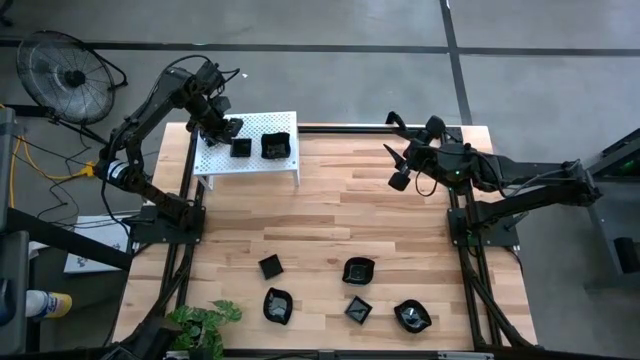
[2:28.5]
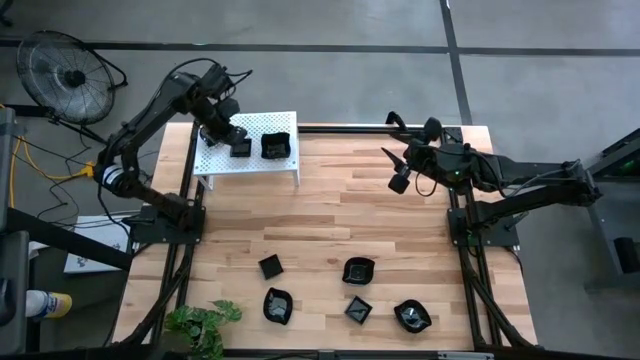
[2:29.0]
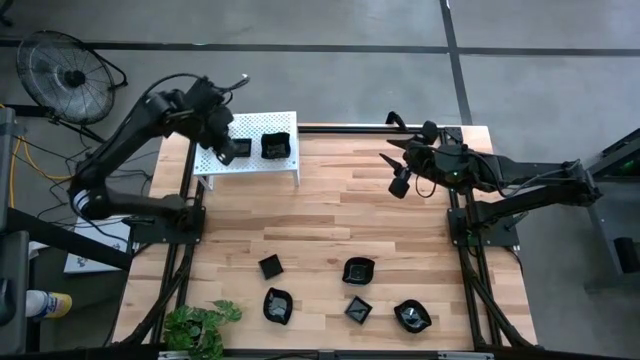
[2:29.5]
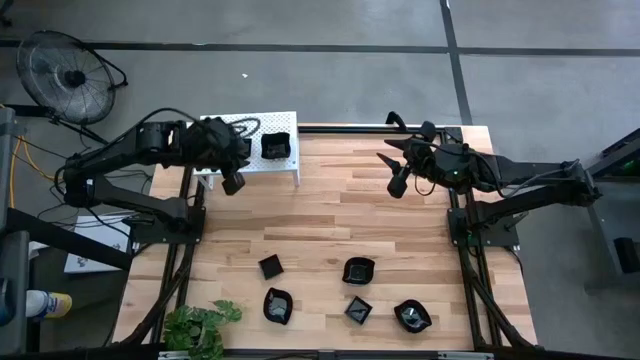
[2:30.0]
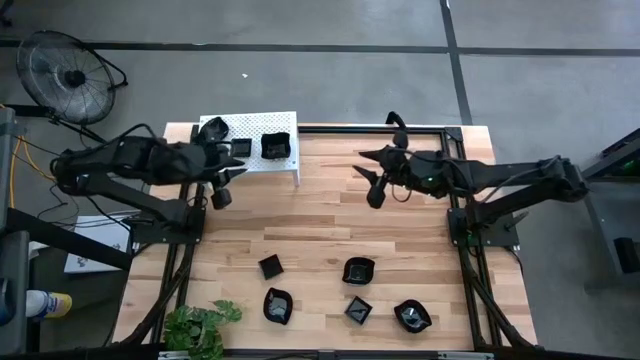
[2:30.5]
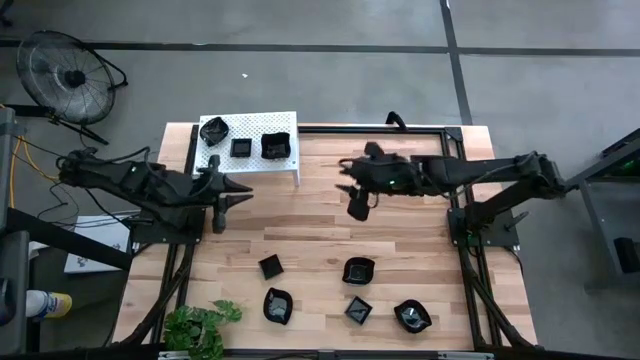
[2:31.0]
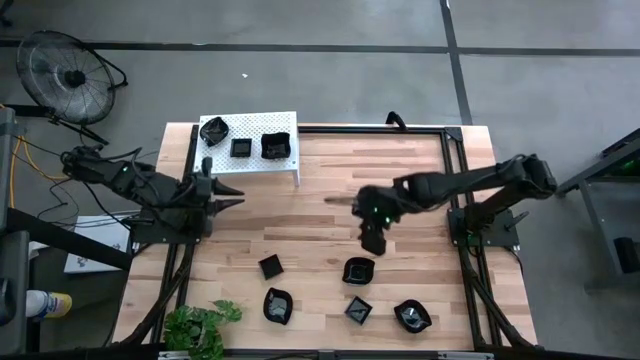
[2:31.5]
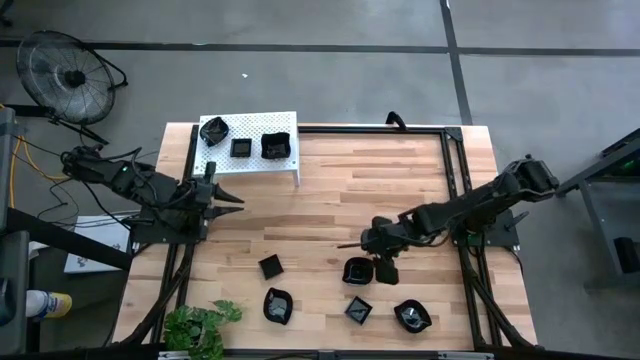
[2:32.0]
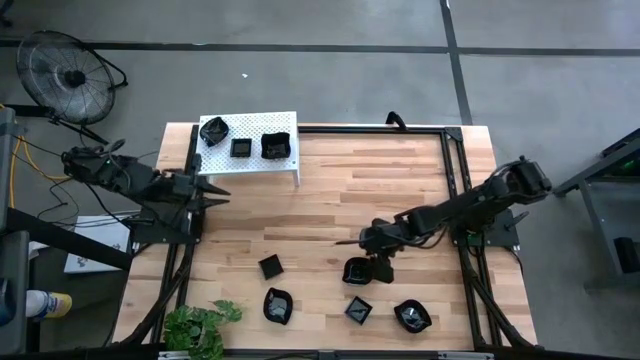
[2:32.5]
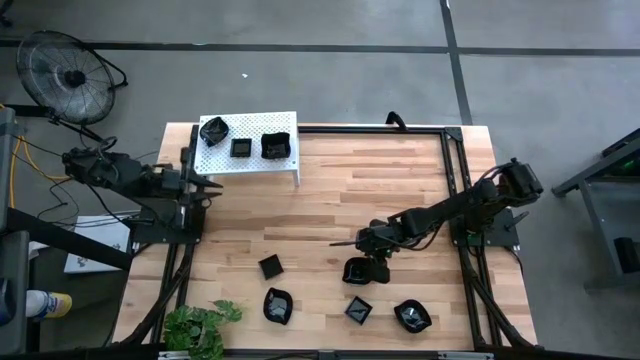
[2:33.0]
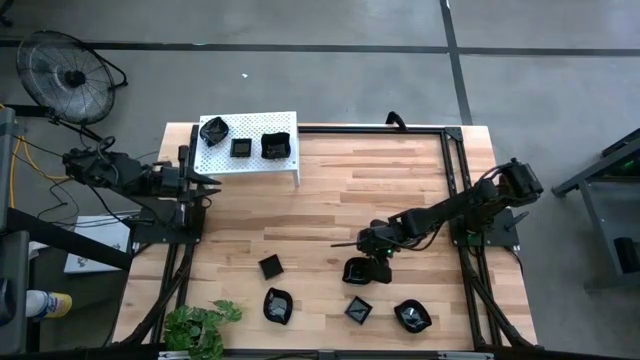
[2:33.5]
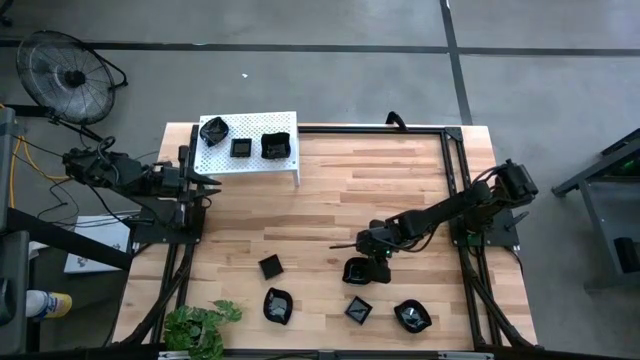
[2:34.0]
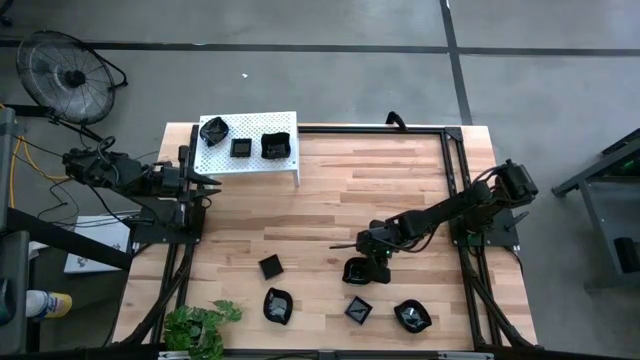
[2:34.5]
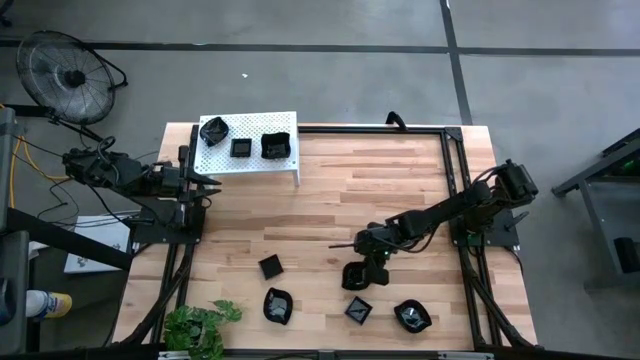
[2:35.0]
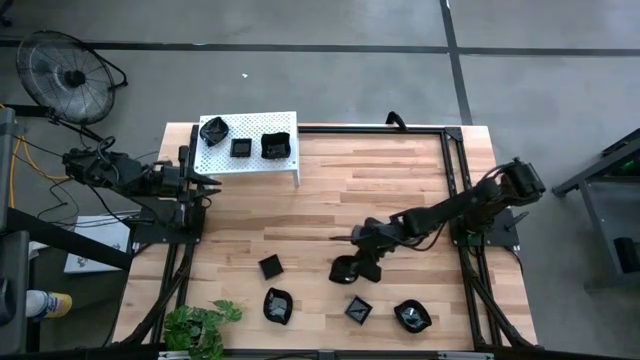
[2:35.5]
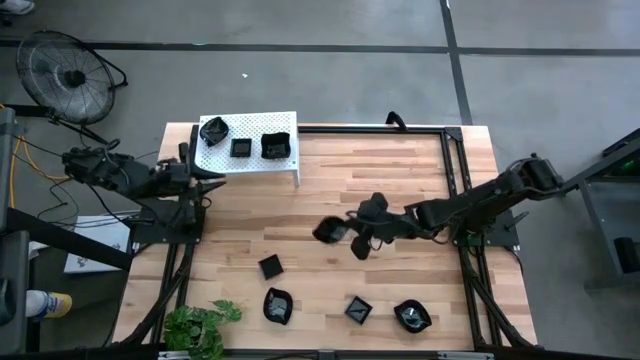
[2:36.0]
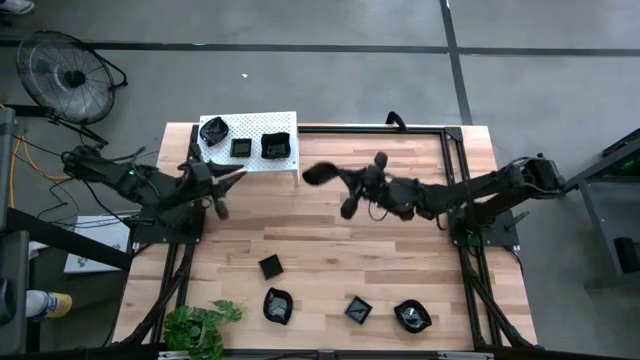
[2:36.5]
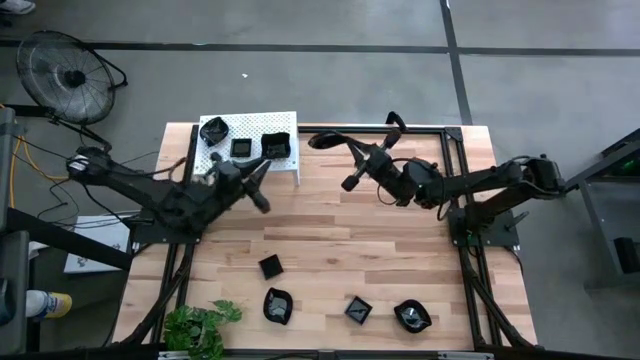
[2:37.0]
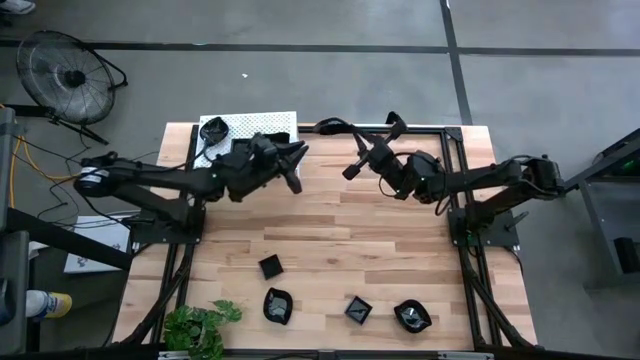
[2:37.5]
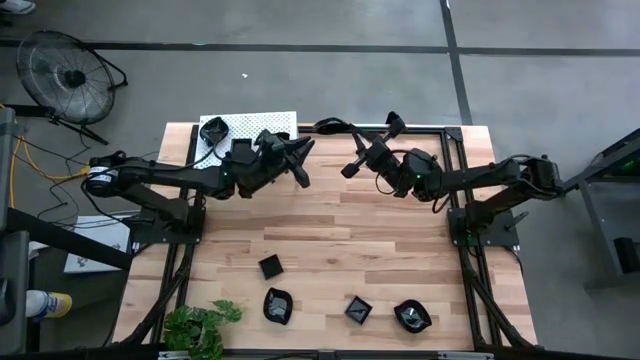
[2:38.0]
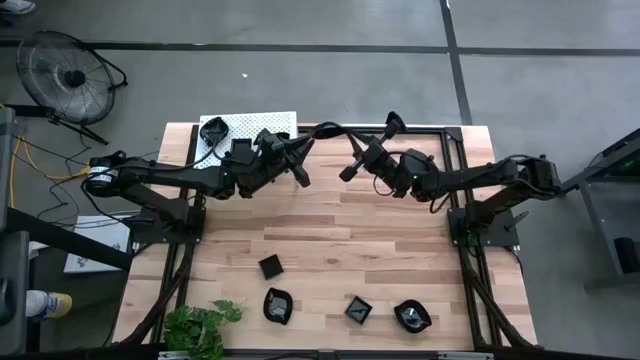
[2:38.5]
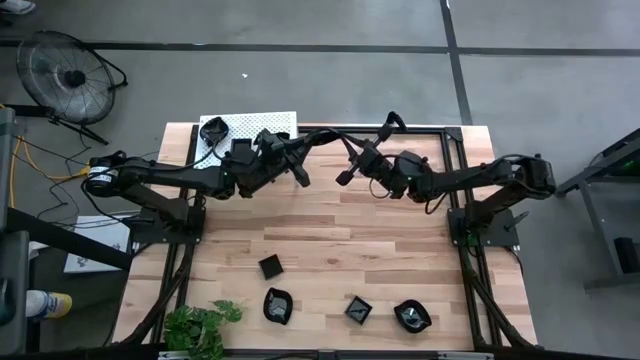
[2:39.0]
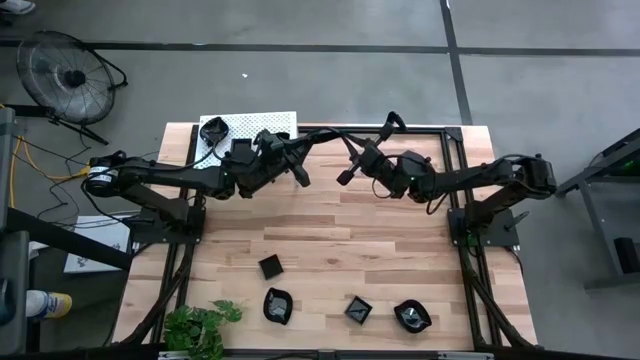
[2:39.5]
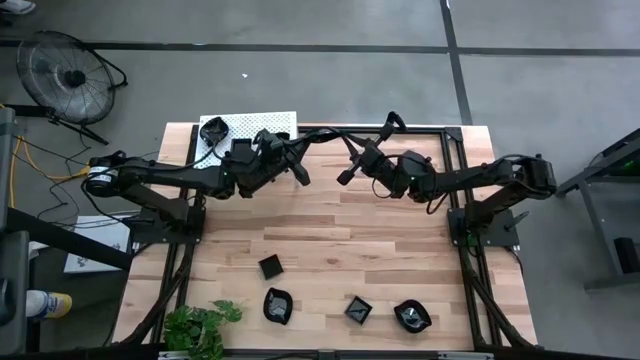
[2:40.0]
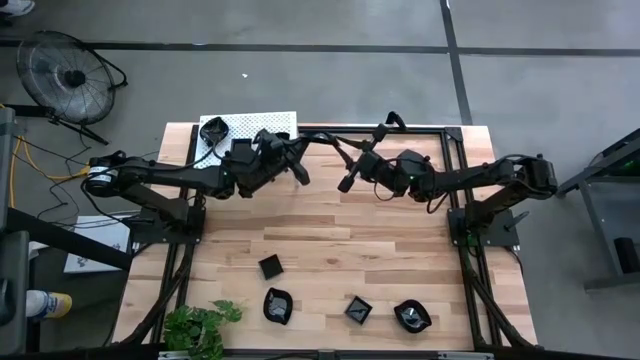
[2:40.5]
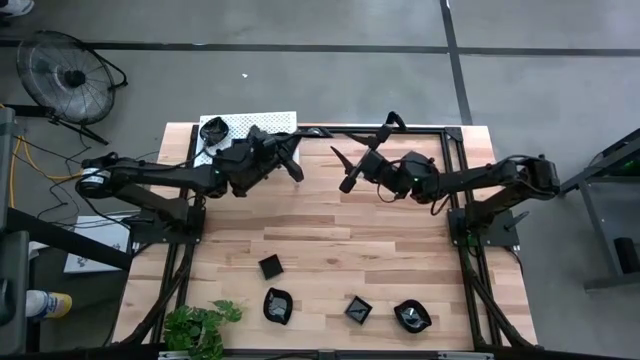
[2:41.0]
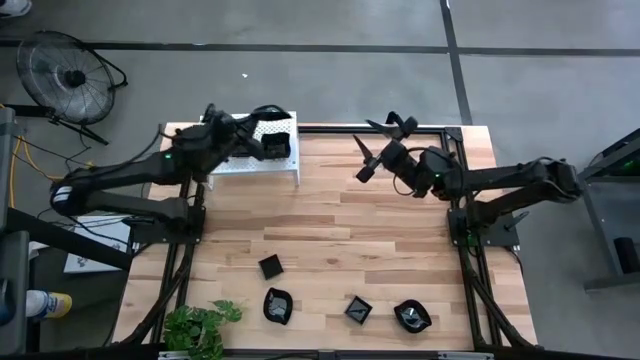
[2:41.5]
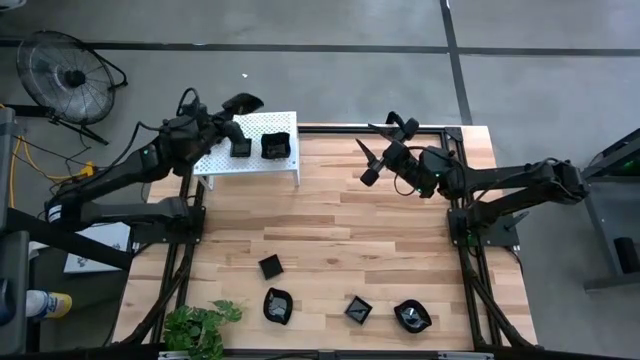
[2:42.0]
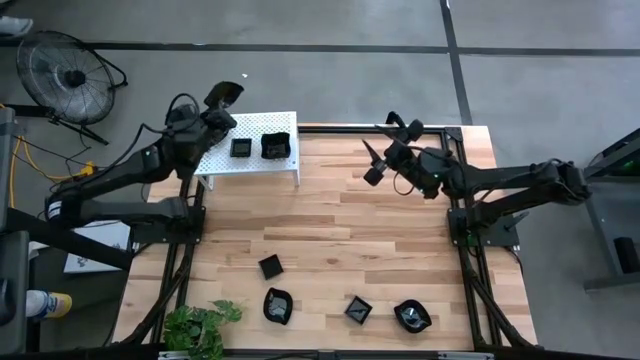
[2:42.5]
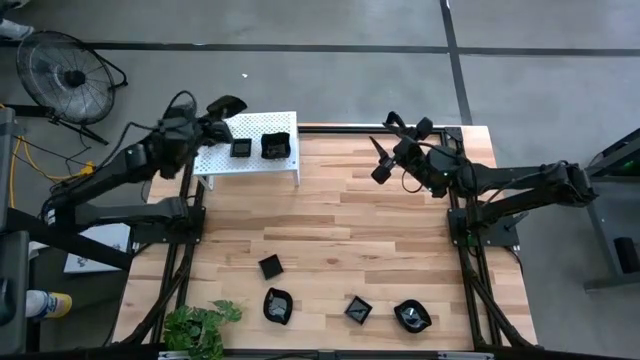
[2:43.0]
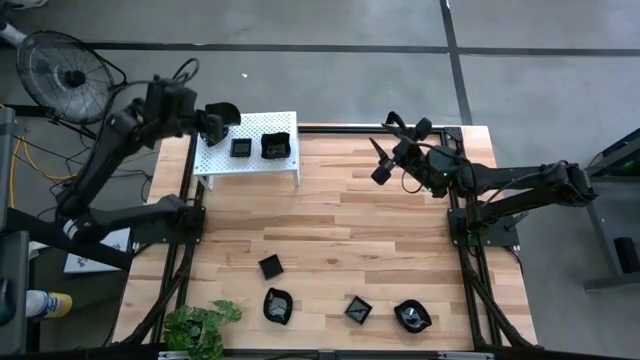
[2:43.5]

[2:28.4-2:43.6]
Task: Pick & Place Mini shaped plates
Stack the black leaf shaped plate on top of the black leaf shaped plate on the shelf

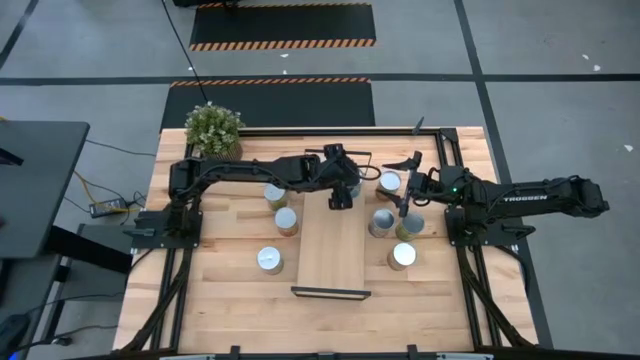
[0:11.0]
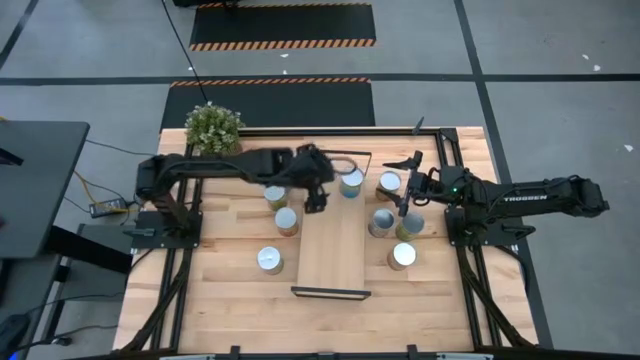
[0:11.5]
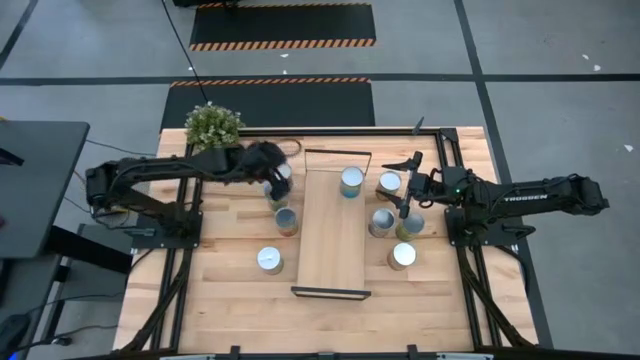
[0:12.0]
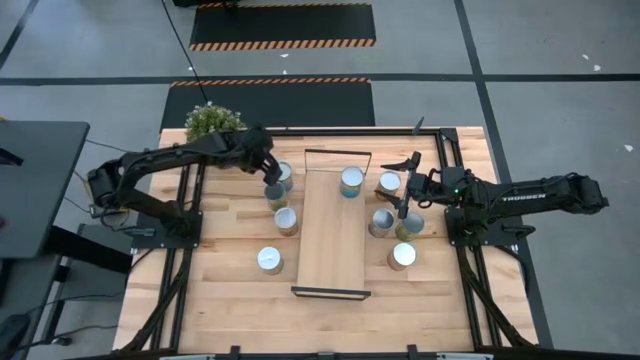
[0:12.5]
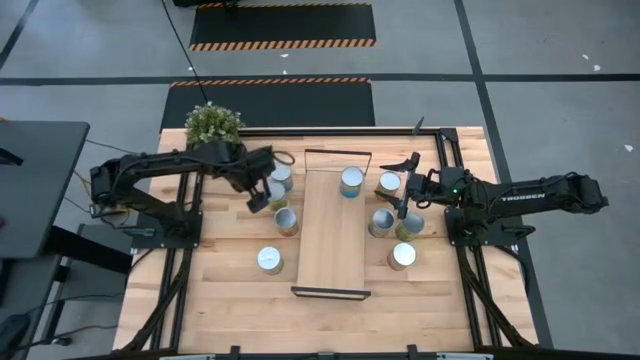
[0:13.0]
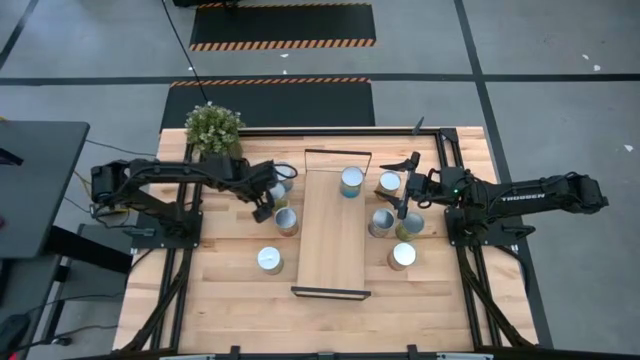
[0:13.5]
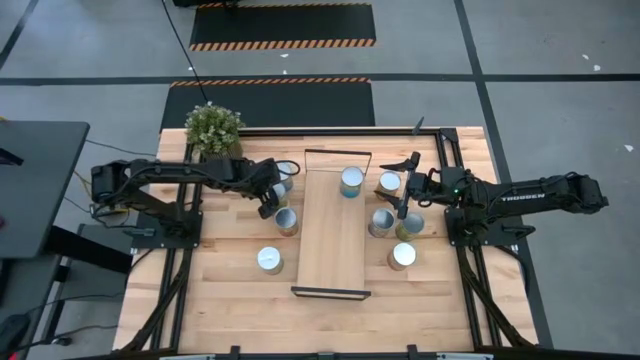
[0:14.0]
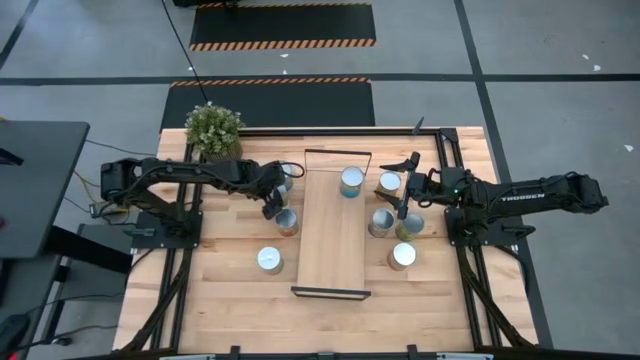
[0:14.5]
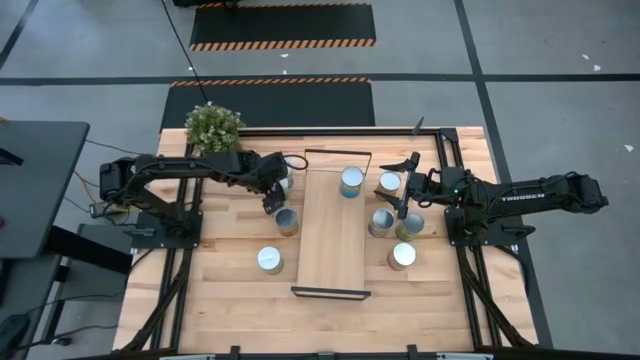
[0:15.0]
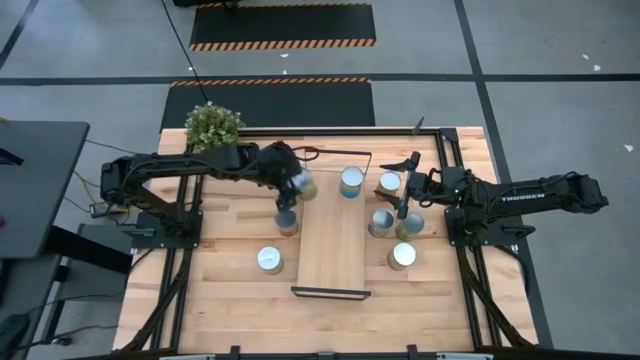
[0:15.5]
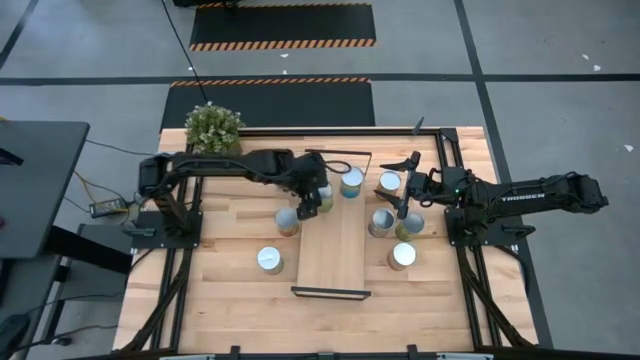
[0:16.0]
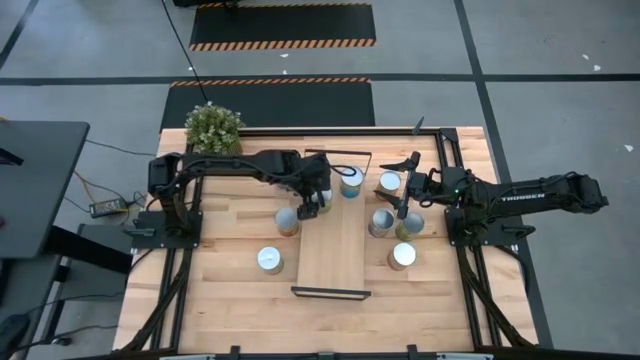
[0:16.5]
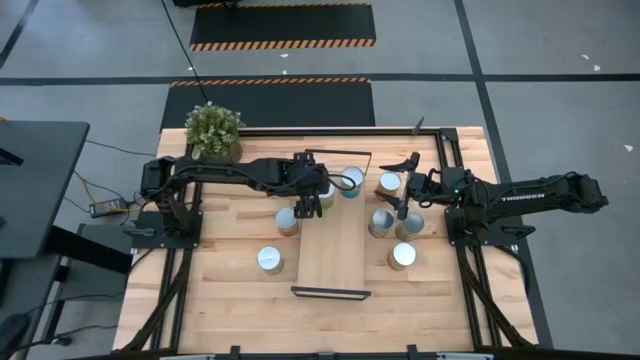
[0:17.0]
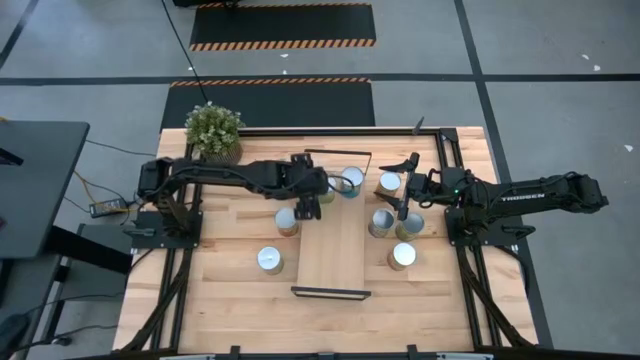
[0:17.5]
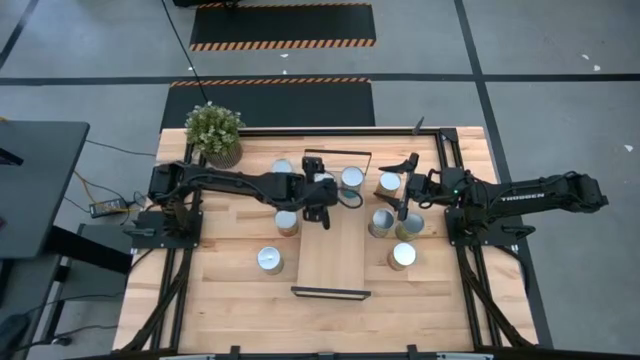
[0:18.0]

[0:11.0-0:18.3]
Task: Pick and place cans onto a shelf
Put the top canned oranges on the shelf
